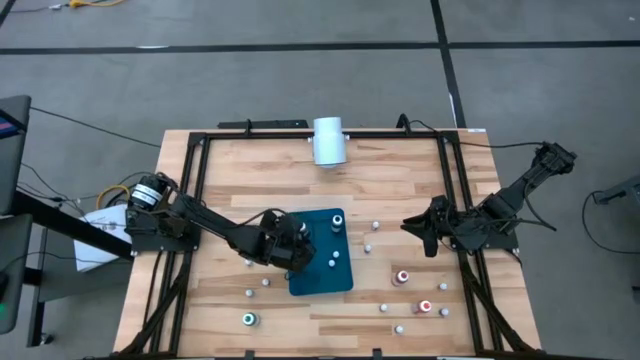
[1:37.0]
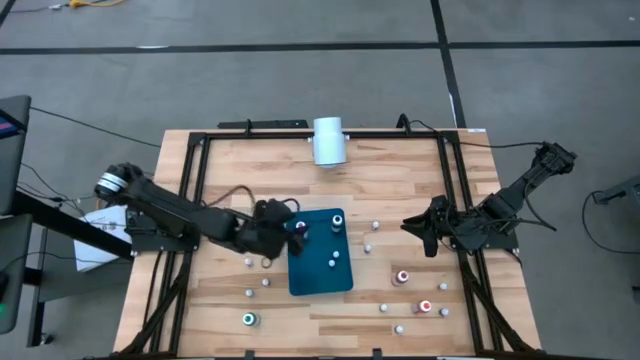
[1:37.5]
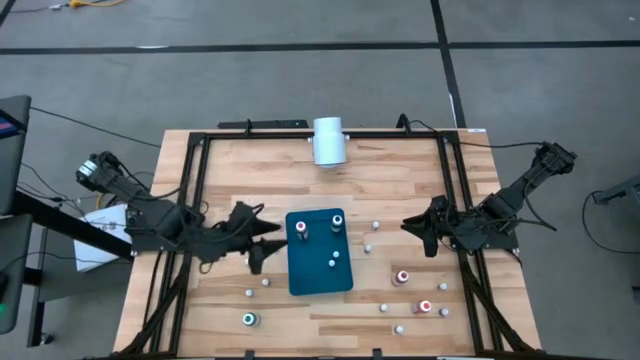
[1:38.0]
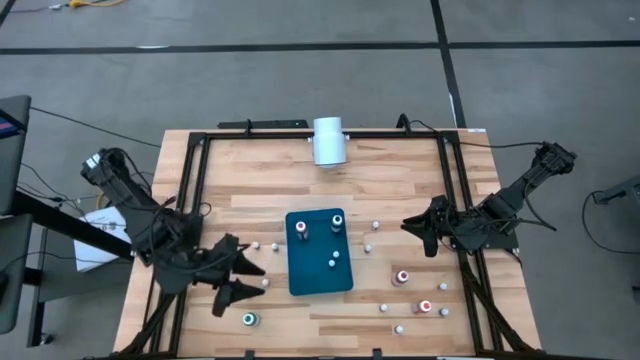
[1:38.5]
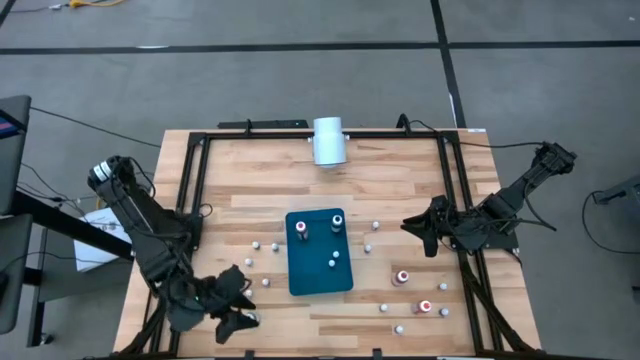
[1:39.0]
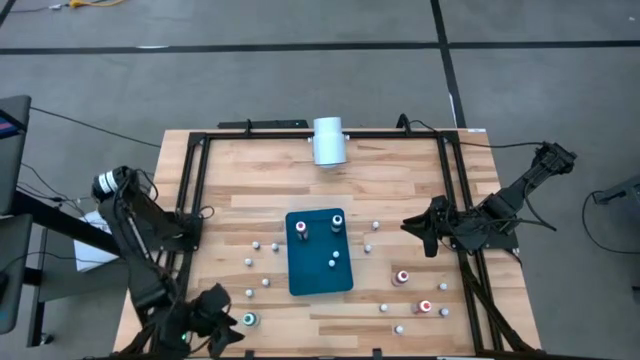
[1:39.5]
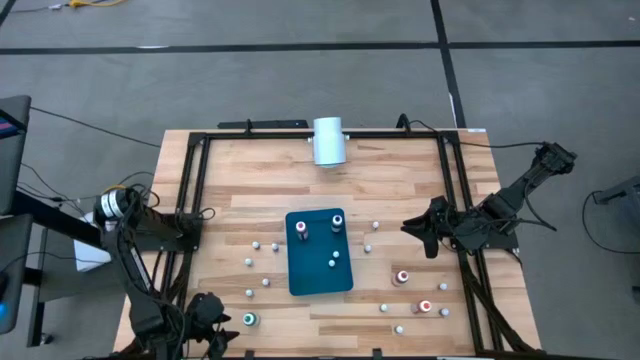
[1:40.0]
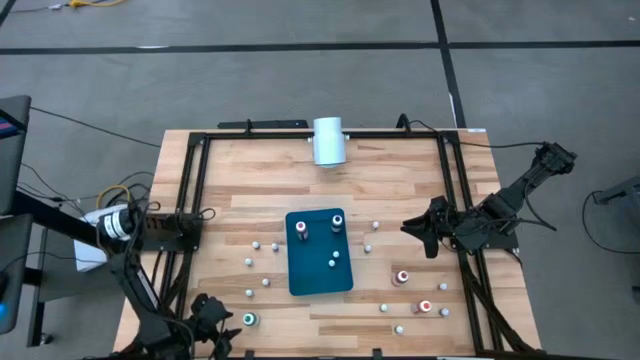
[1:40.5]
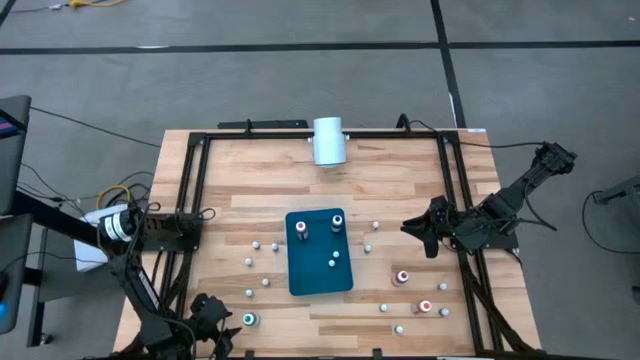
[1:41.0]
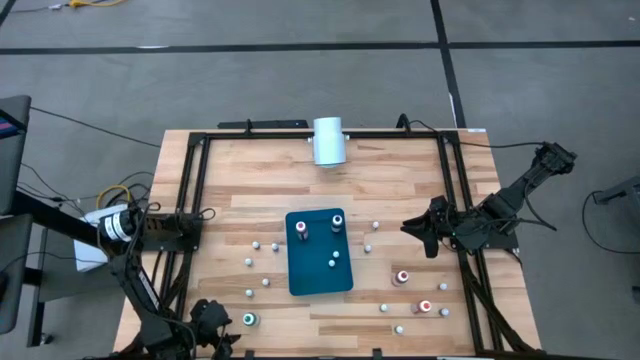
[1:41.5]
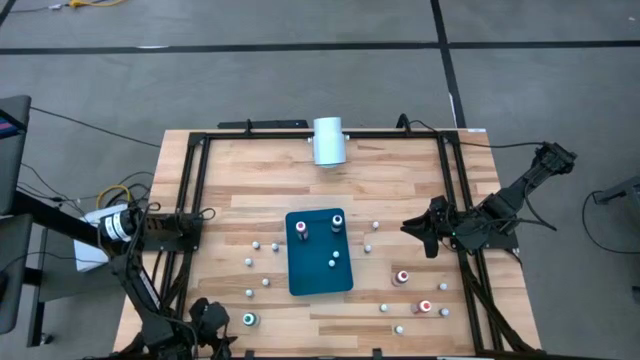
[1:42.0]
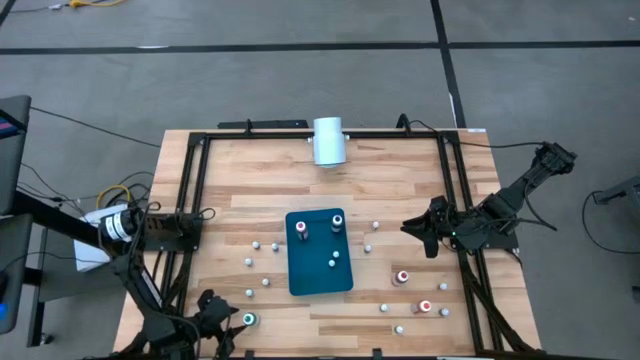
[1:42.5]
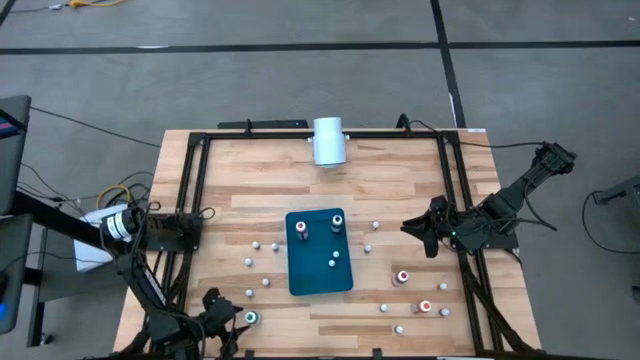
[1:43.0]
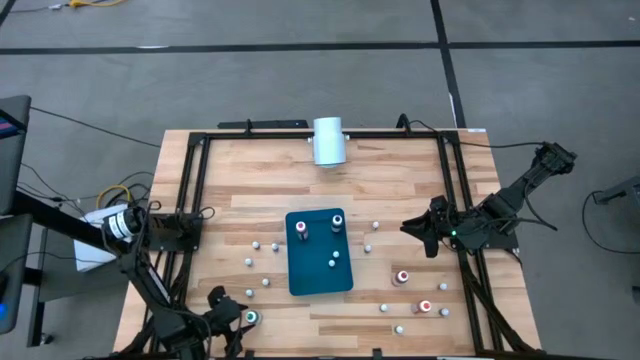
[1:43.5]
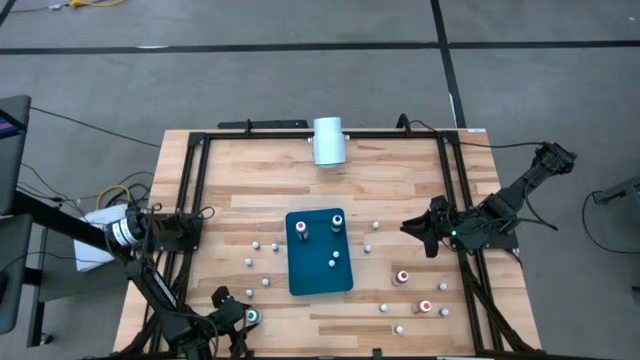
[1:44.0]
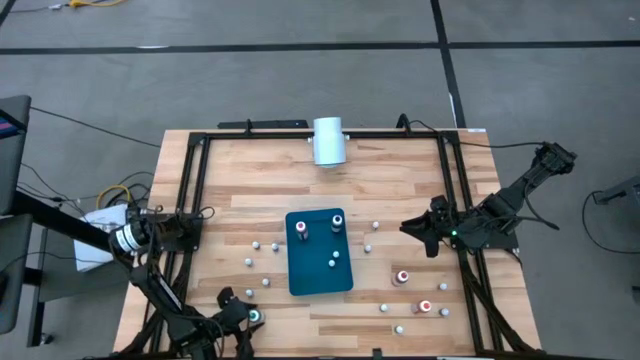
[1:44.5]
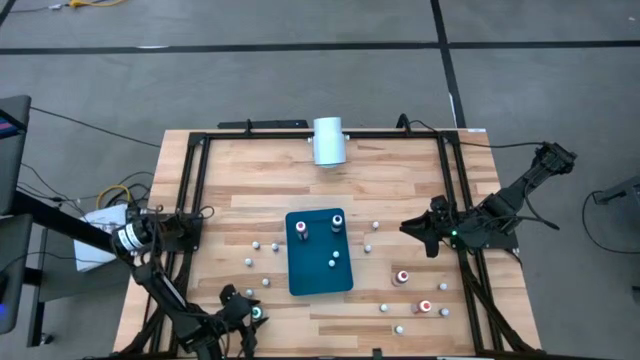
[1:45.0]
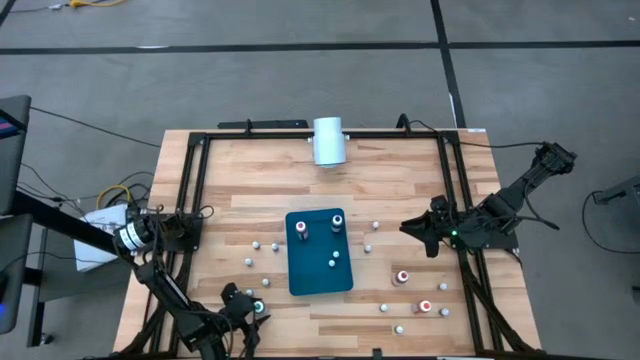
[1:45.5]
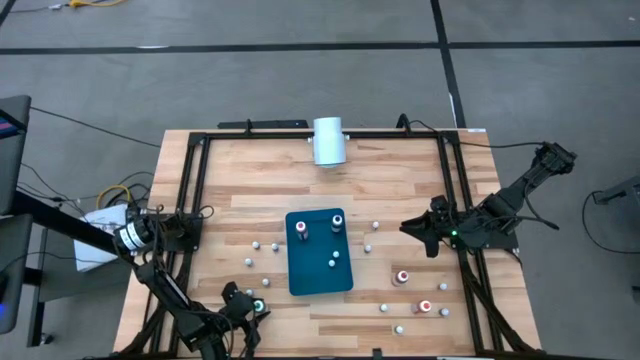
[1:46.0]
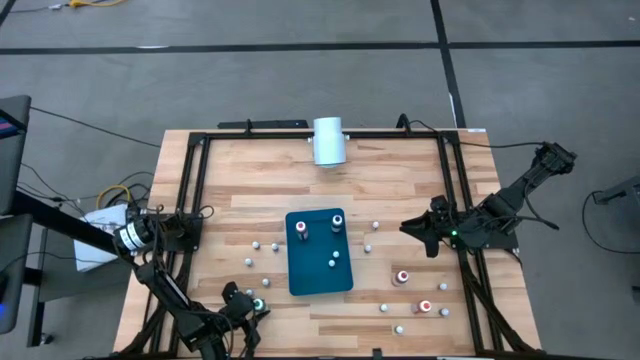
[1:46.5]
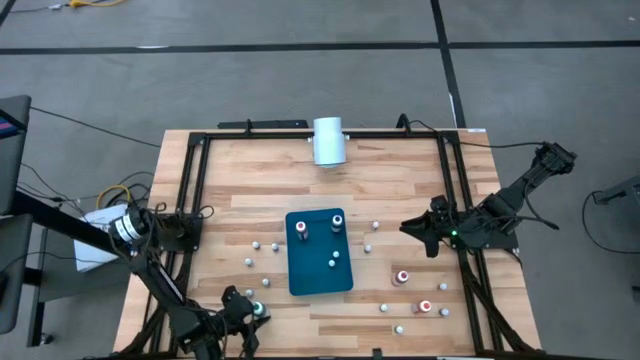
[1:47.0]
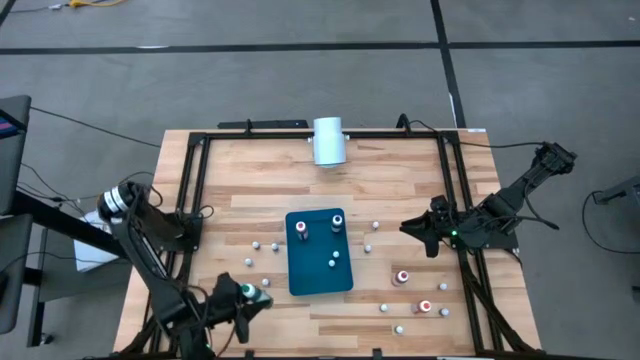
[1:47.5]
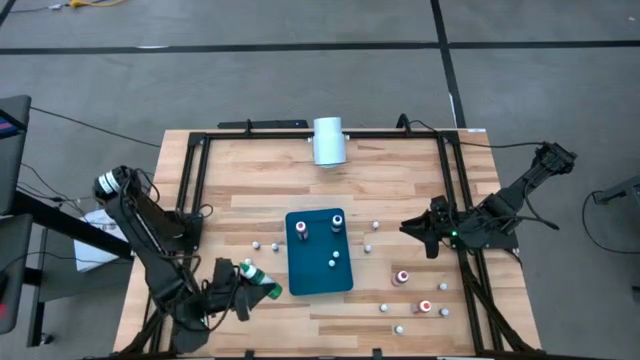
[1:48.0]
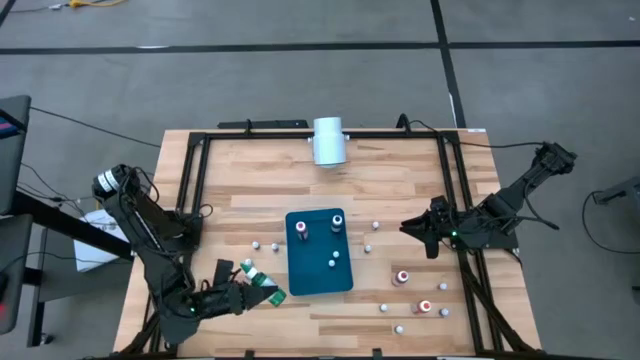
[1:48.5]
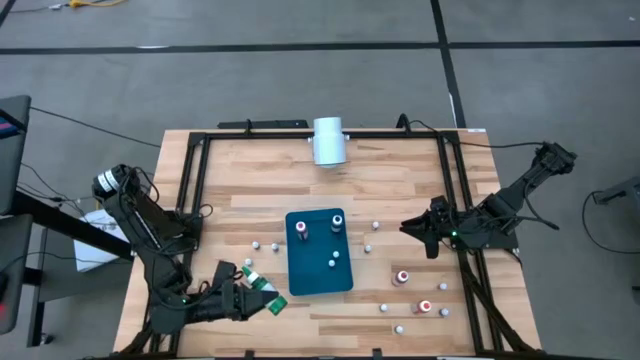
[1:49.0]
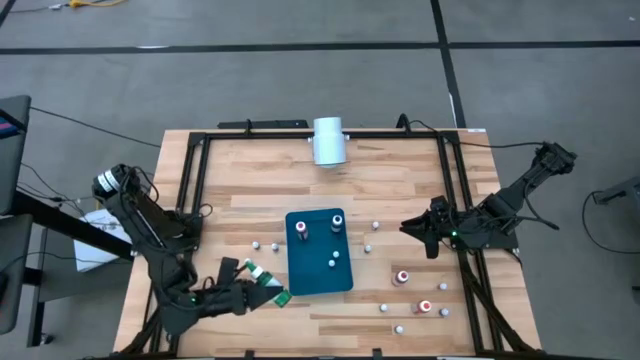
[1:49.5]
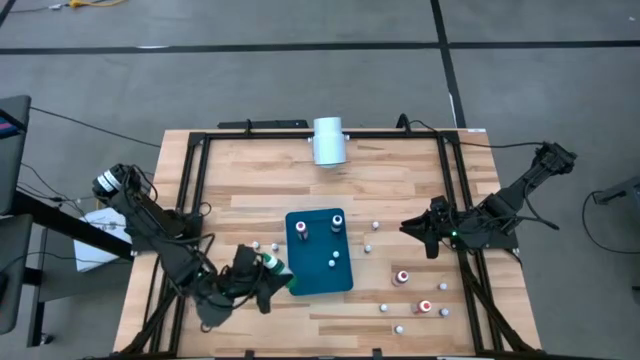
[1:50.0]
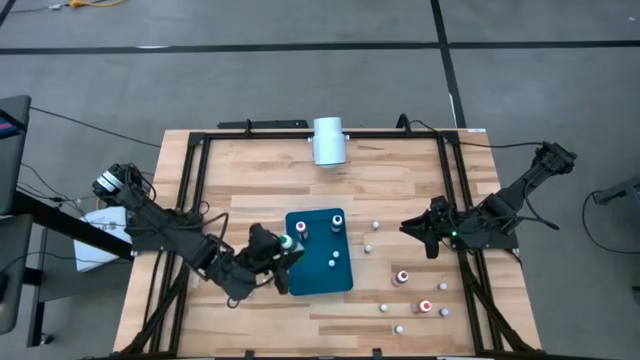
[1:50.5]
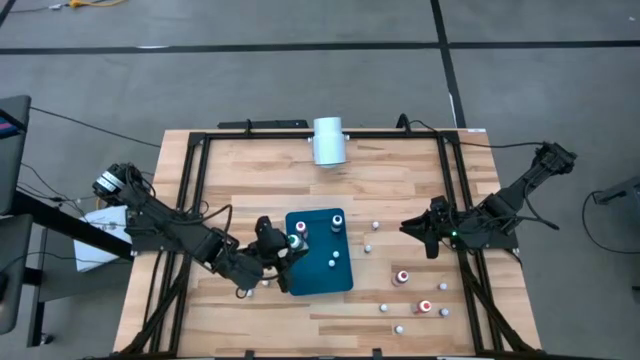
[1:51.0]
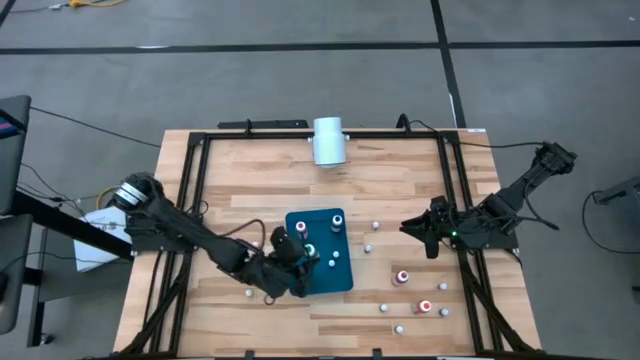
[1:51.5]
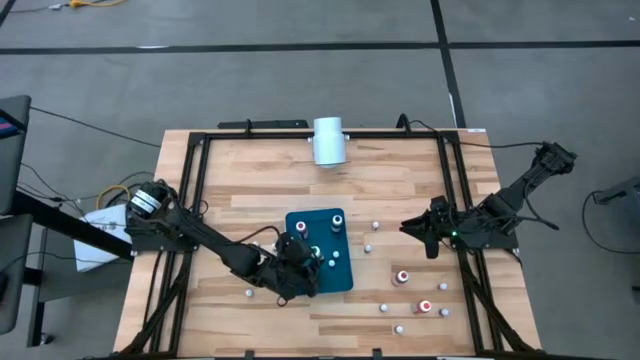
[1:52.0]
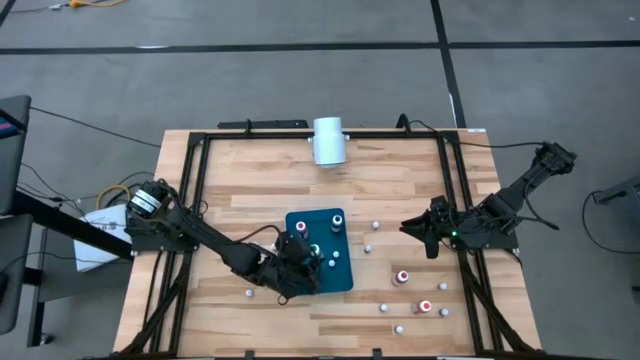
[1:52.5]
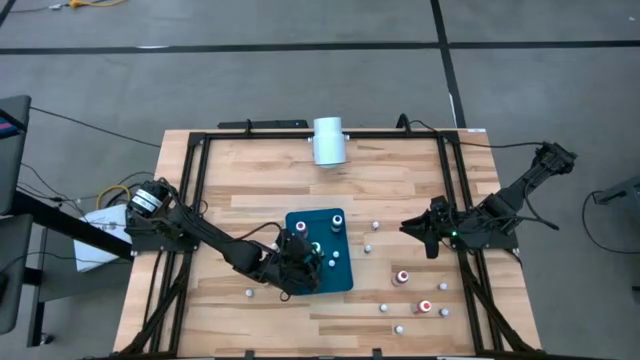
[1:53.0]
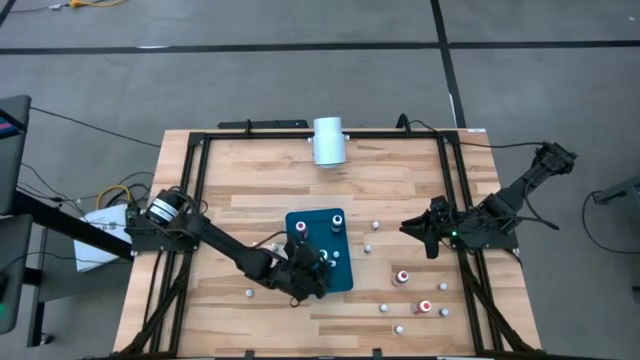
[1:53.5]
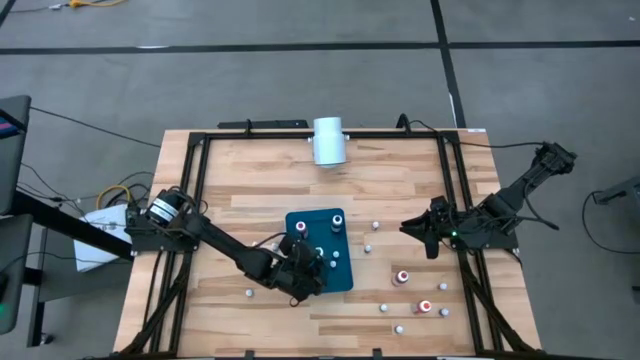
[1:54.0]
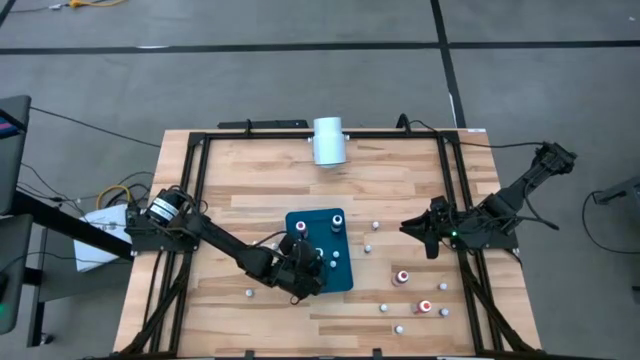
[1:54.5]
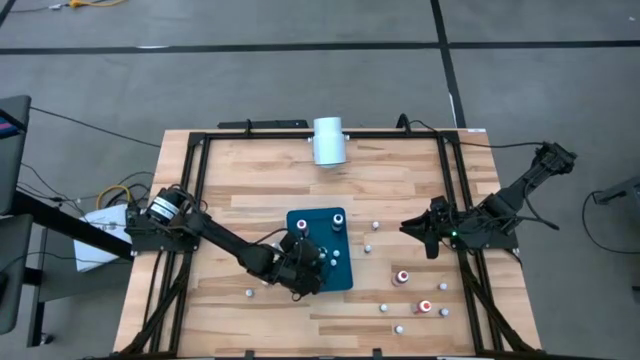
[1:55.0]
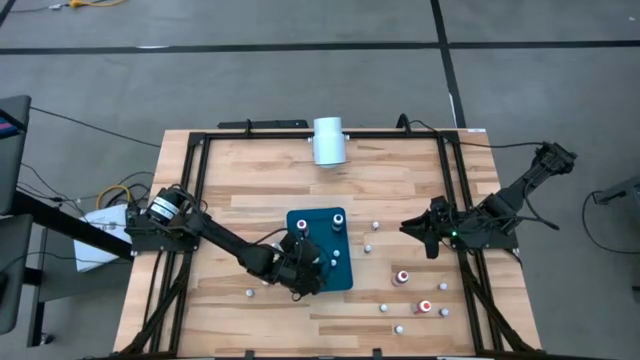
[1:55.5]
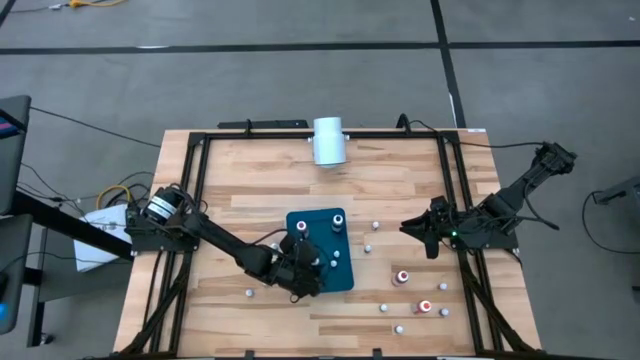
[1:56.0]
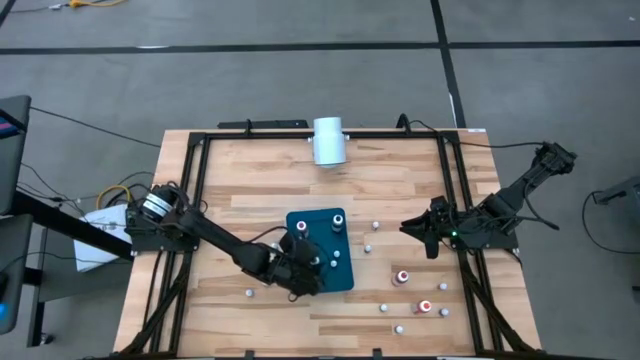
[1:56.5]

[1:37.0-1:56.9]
Task: Pick & Place food coloring
Put the big green food coloring bottle into the blue bin

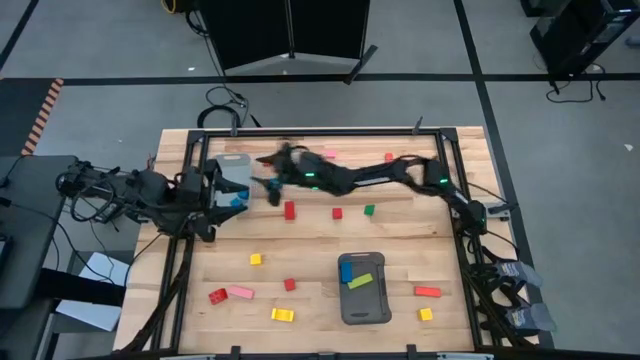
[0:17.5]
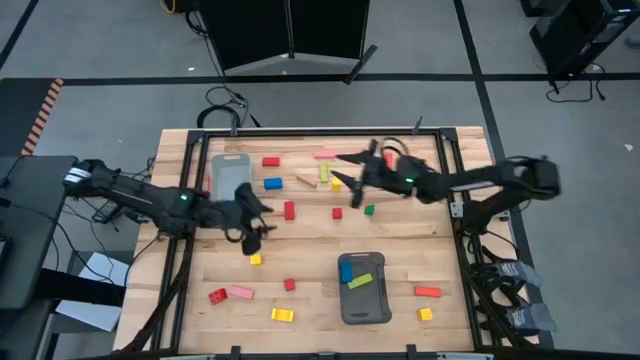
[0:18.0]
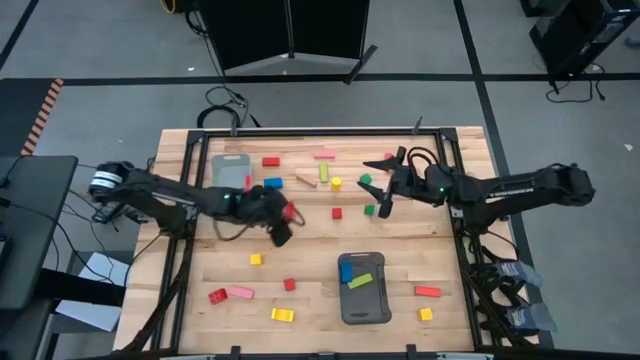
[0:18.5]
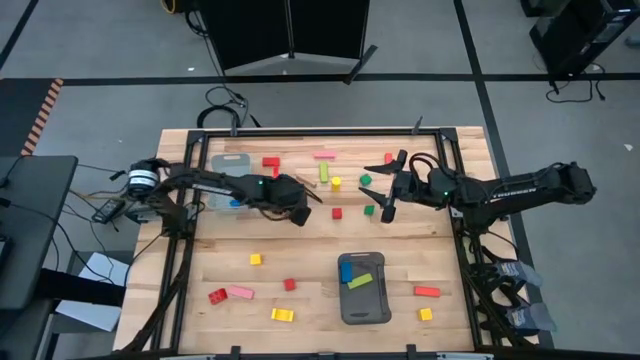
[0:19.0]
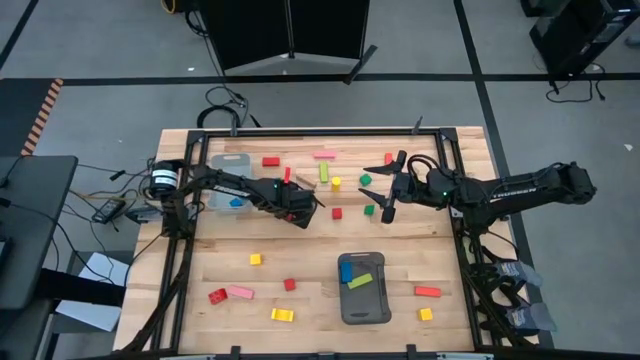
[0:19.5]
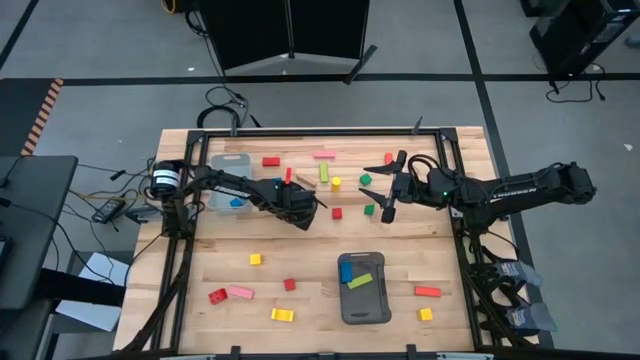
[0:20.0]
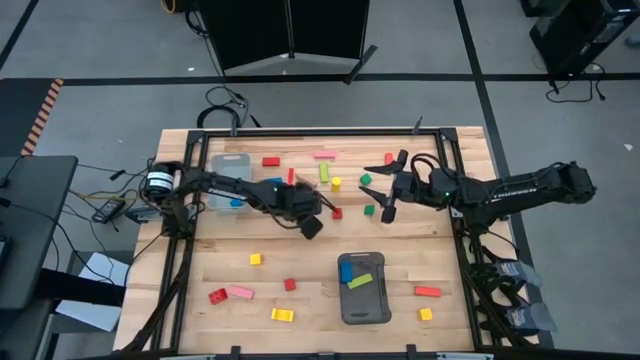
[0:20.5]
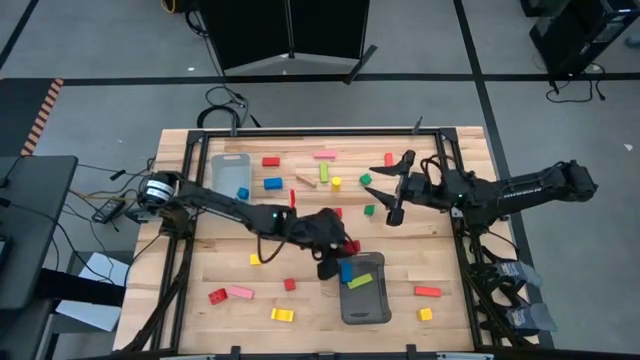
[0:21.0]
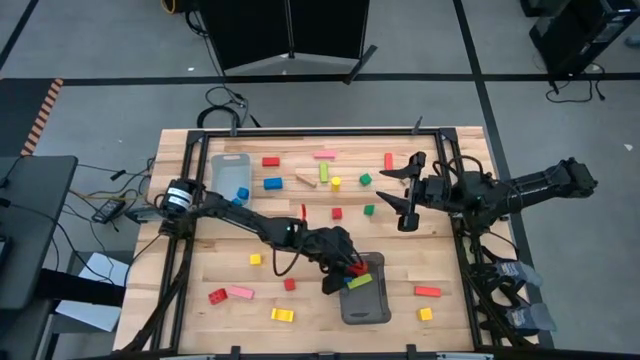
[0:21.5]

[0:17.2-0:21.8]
Task: Sort blocks by size
Put the red rectangular block into the black bin
